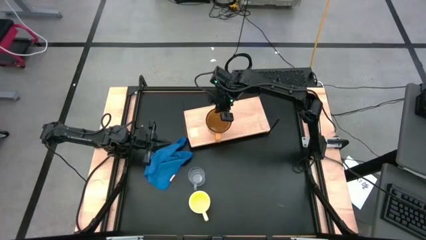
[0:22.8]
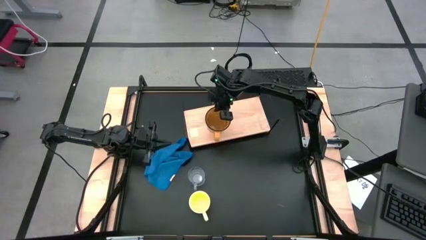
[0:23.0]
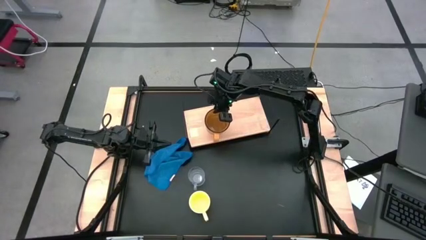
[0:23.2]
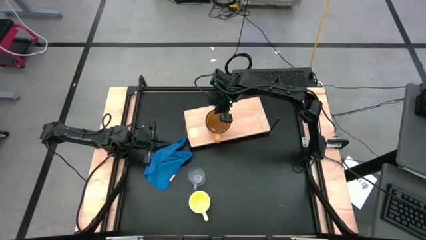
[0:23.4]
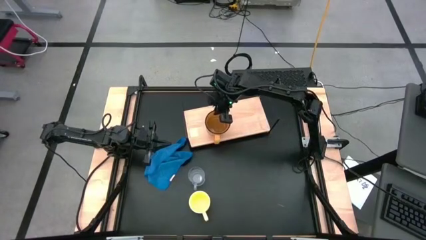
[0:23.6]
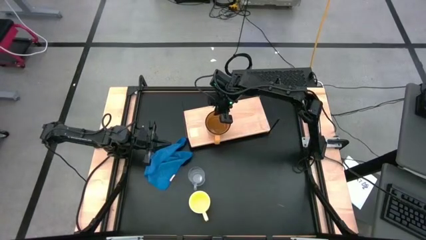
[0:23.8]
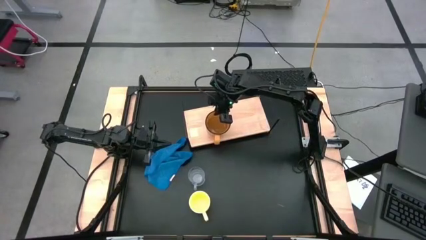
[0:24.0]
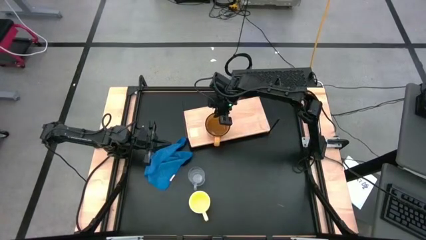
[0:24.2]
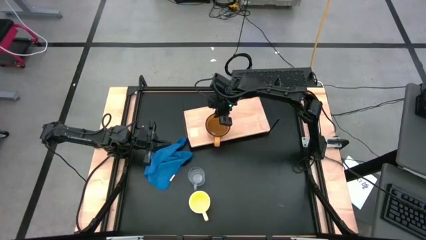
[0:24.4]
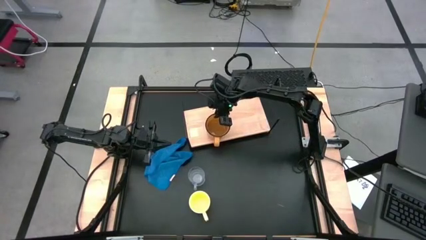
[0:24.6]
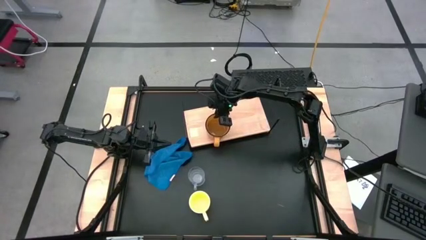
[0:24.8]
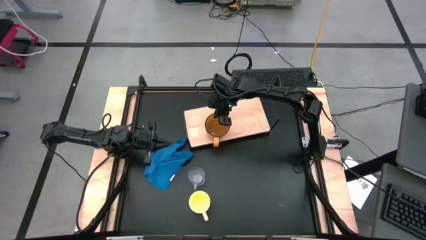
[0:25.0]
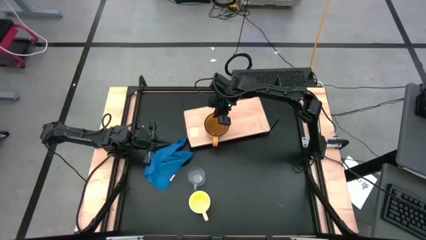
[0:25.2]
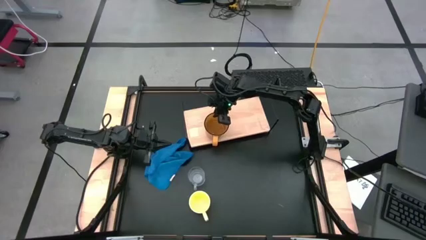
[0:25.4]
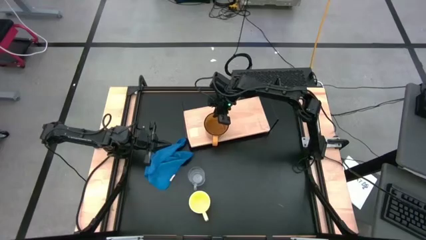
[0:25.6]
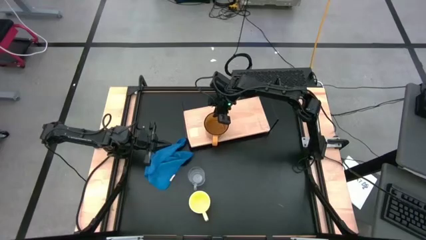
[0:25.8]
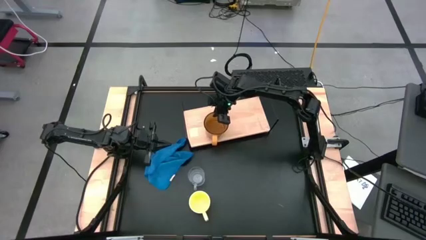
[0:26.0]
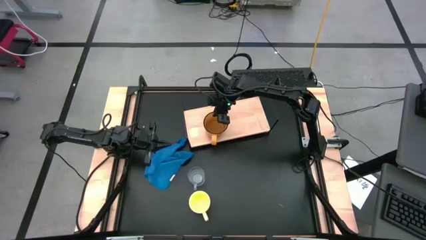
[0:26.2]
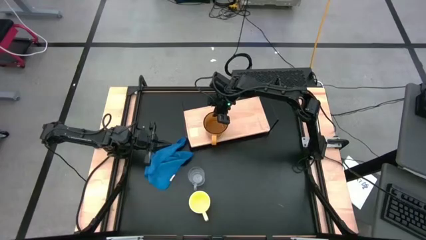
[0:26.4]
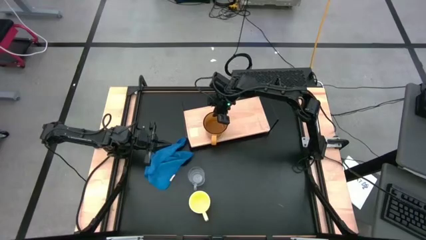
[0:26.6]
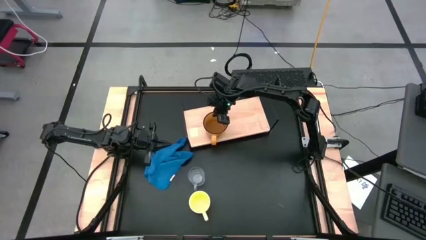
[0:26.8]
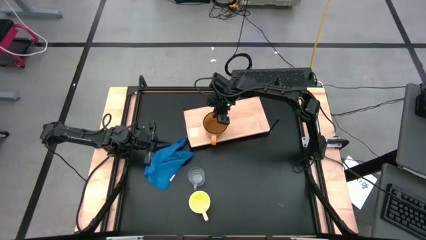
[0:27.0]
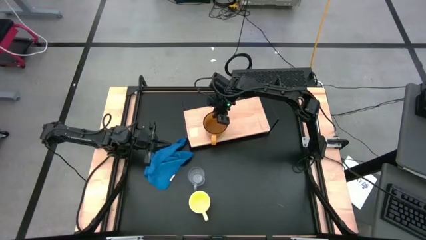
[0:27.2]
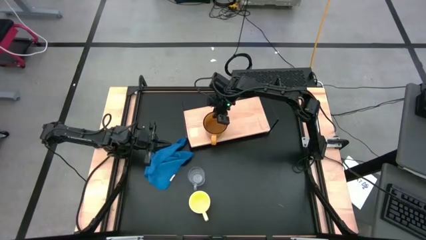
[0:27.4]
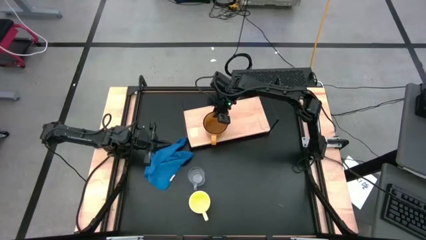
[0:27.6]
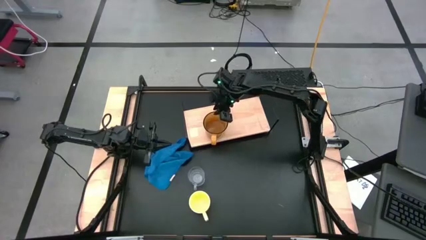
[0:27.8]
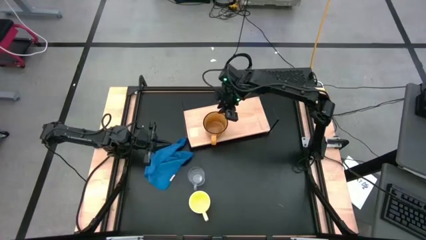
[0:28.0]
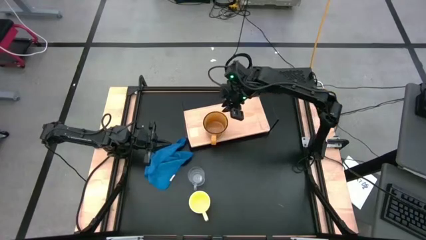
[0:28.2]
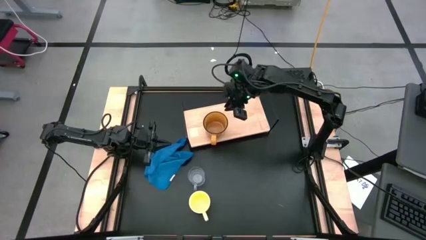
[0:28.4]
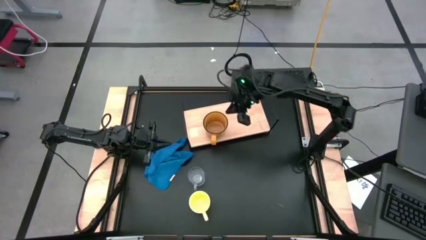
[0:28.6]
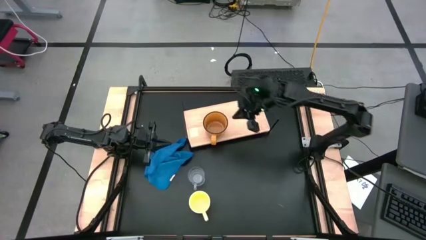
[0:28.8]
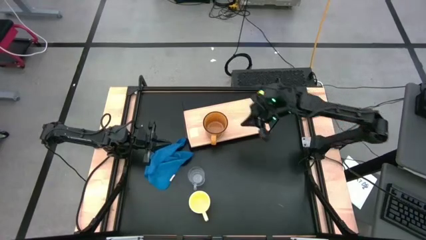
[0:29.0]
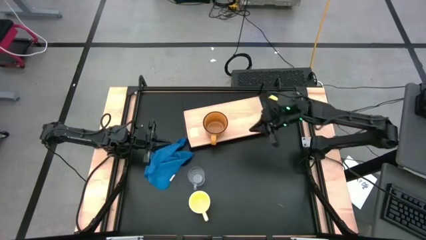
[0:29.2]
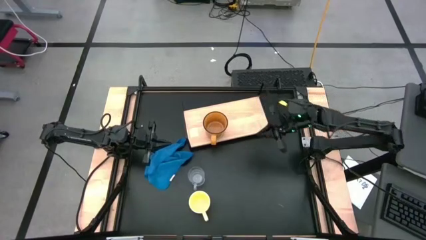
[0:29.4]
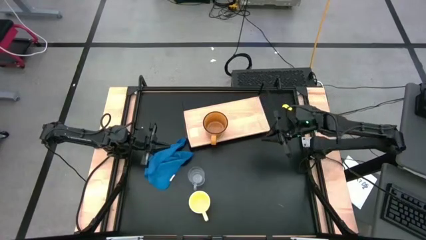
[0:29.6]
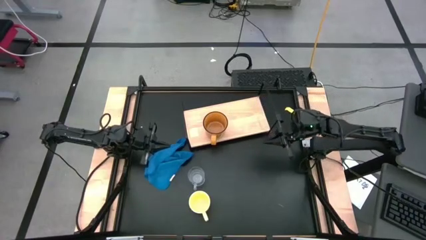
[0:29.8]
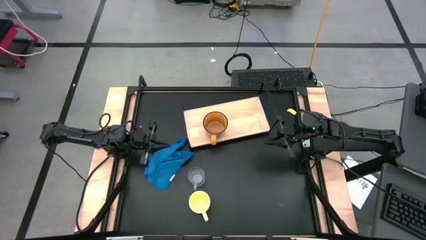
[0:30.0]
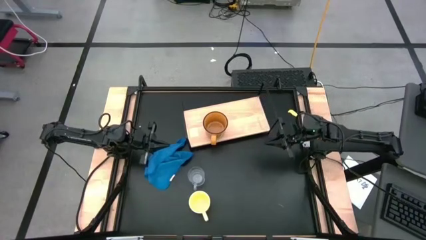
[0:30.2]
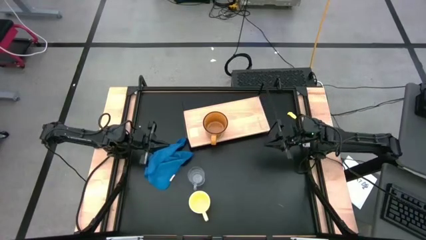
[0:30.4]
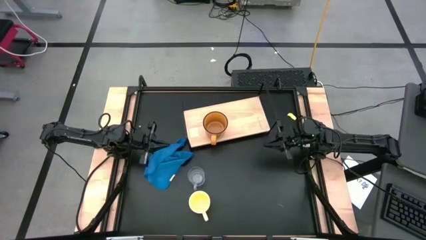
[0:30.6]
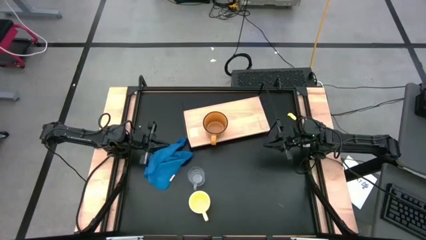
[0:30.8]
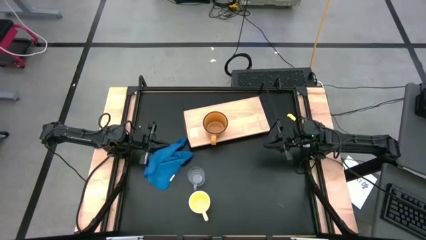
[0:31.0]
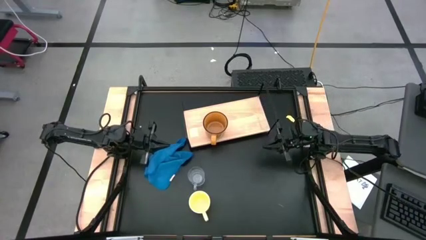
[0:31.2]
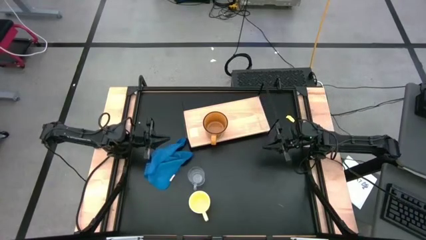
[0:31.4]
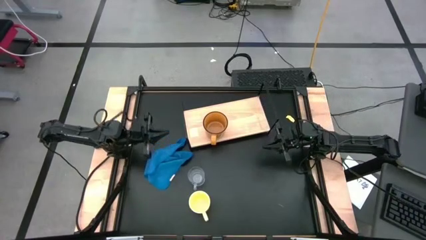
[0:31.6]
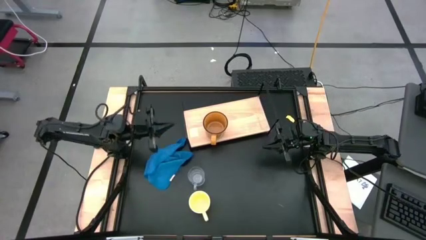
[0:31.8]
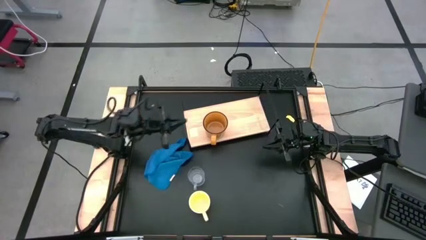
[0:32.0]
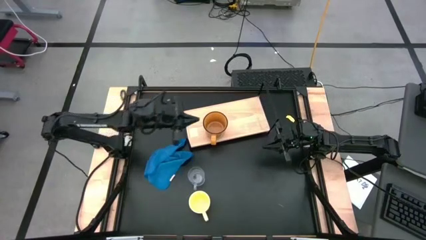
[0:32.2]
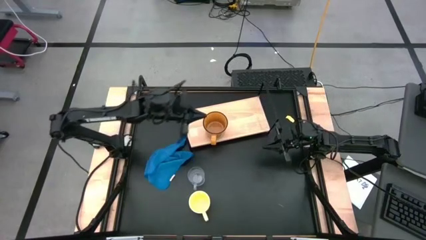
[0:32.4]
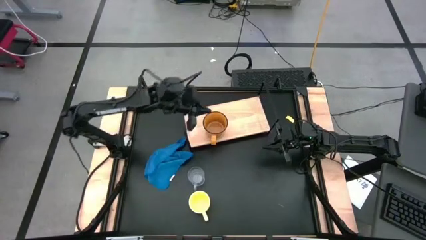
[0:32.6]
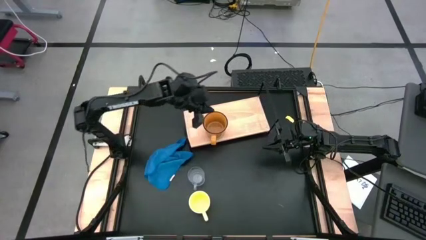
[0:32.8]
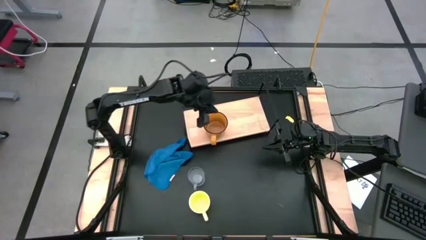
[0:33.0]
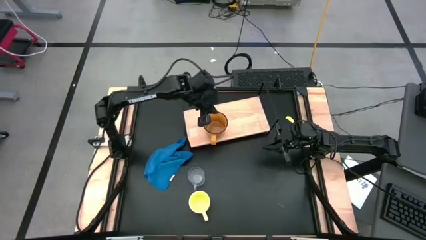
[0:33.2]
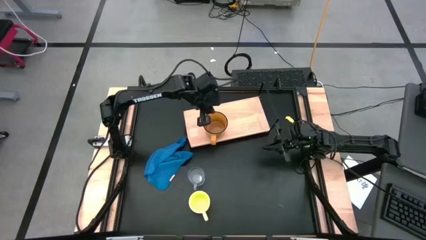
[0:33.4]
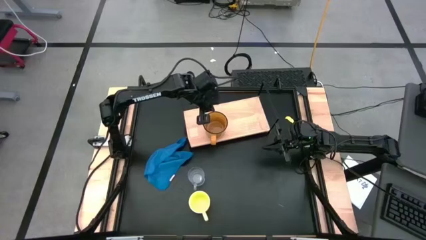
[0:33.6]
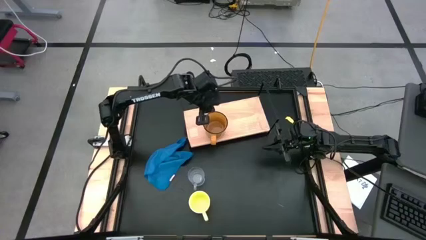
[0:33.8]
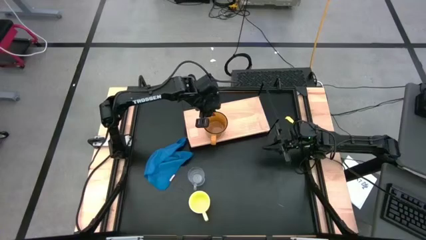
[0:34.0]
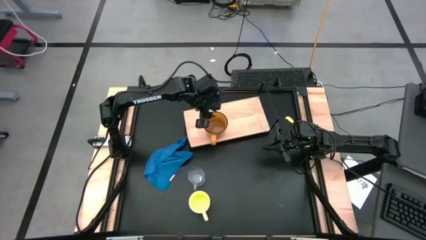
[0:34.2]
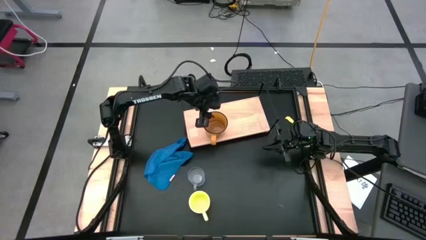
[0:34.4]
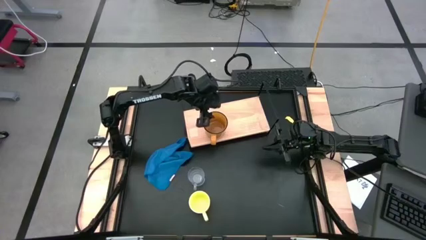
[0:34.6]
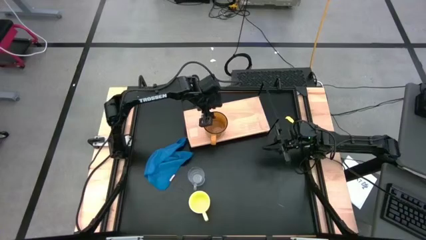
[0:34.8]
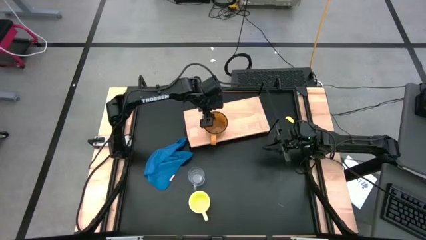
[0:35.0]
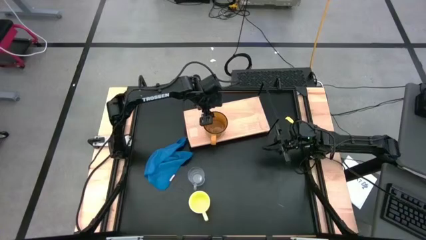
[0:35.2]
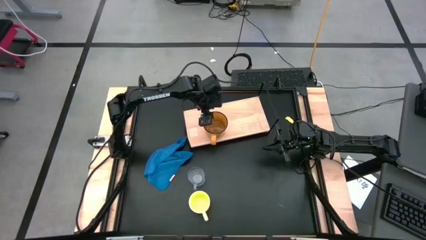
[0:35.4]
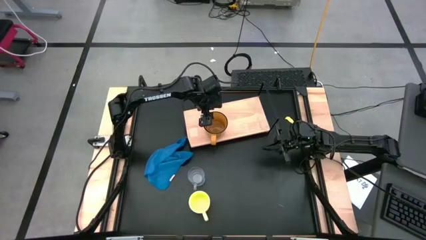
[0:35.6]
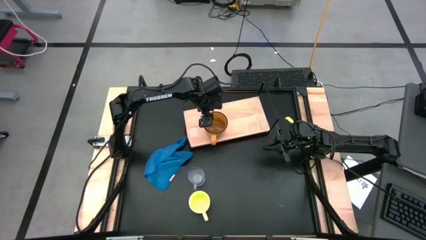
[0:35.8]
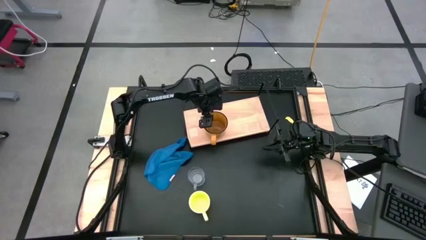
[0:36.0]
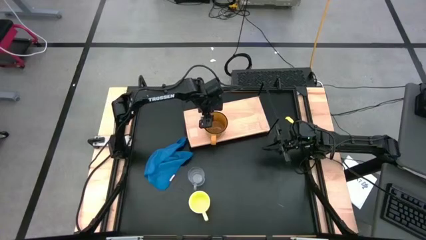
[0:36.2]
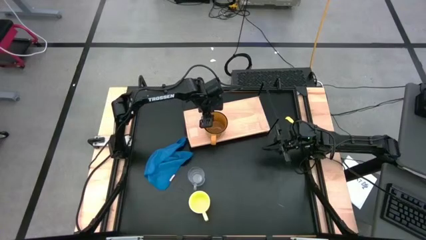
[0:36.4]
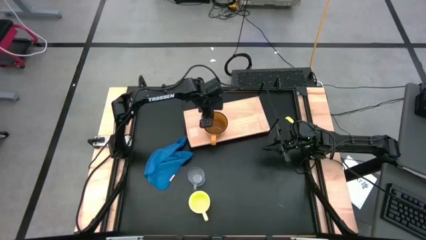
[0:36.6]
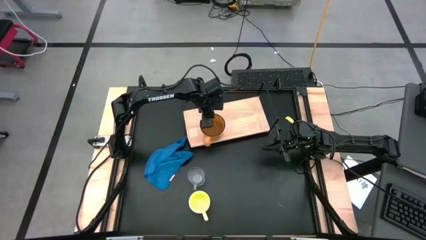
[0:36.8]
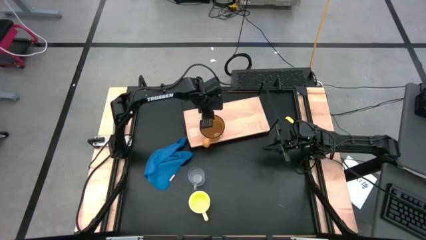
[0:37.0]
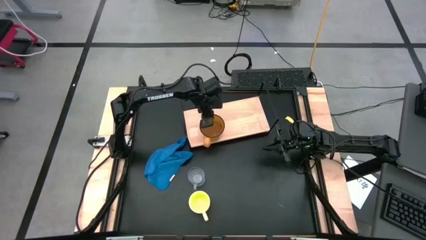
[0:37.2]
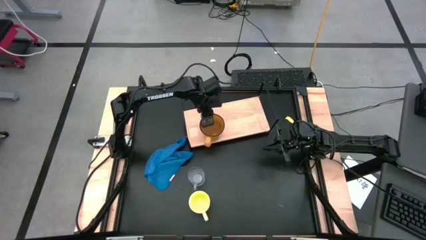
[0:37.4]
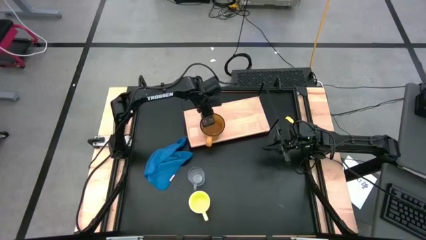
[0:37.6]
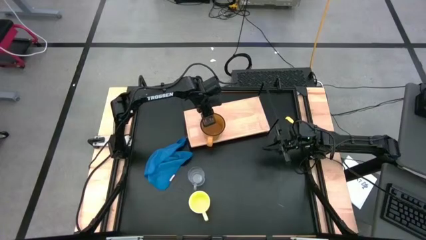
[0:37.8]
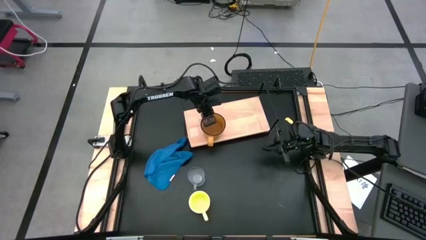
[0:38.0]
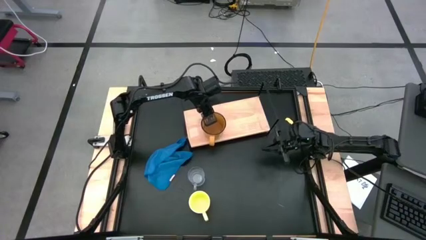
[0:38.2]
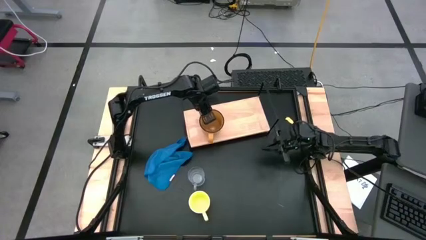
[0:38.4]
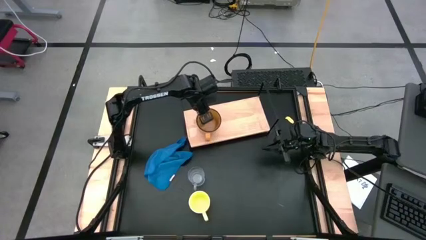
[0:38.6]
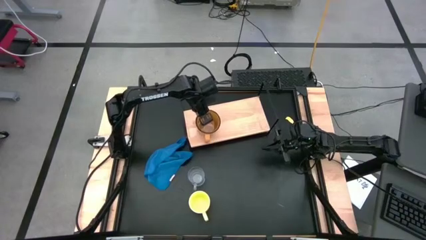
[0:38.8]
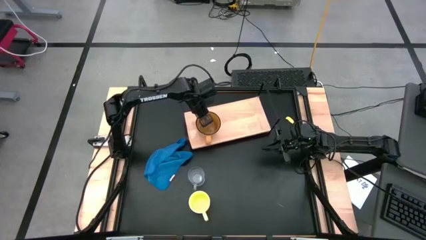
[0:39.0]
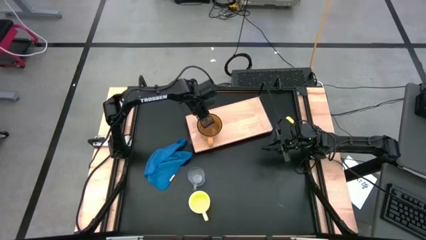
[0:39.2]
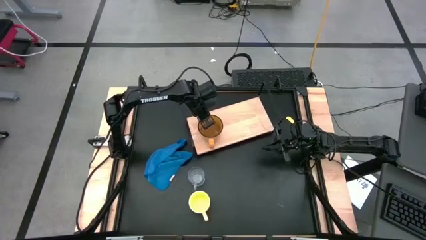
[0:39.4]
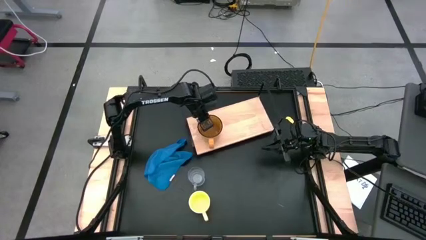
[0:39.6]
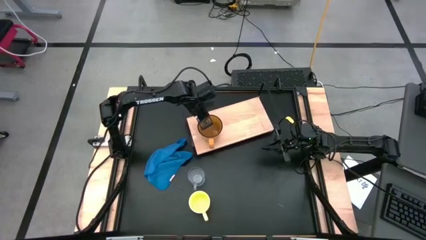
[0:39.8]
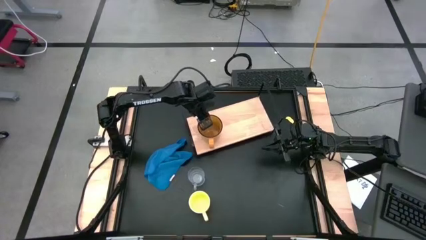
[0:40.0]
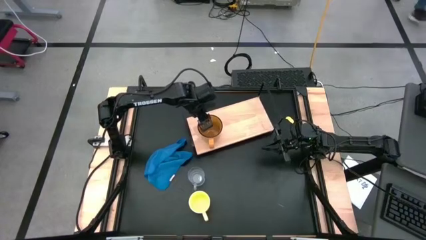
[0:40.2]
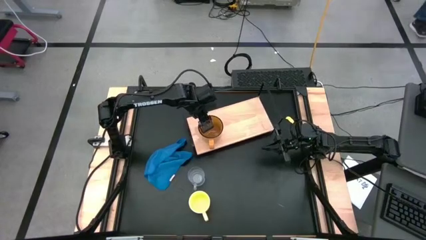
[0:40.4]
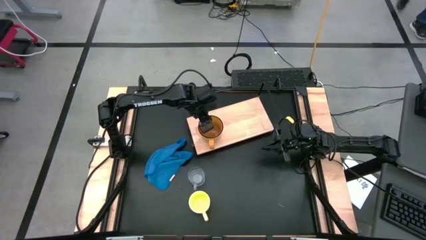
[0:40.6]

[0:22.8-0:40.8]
Task: Stack small to large cups/mugs on shelf
Put the brown mug on the shelf
